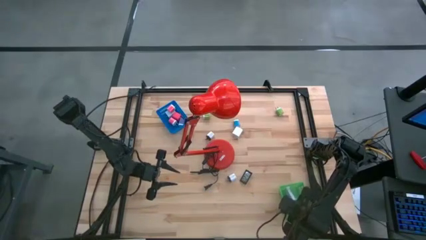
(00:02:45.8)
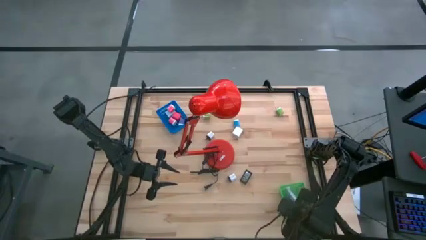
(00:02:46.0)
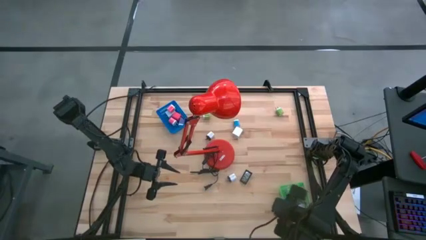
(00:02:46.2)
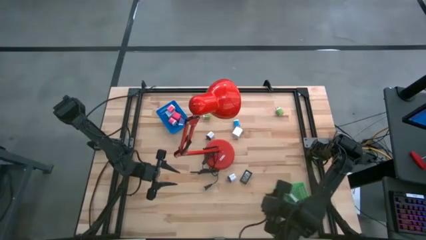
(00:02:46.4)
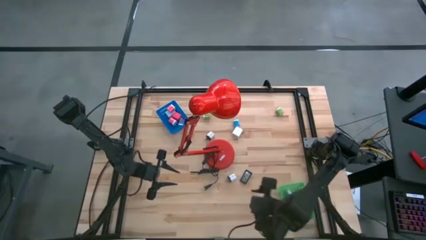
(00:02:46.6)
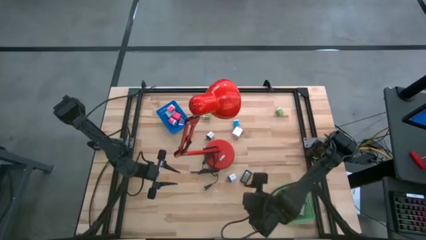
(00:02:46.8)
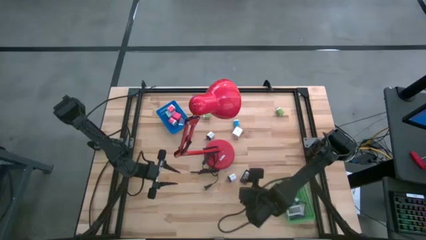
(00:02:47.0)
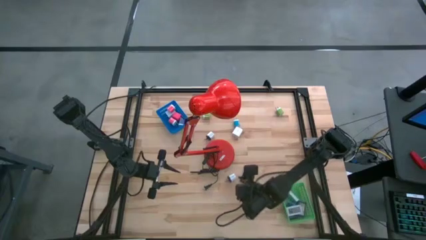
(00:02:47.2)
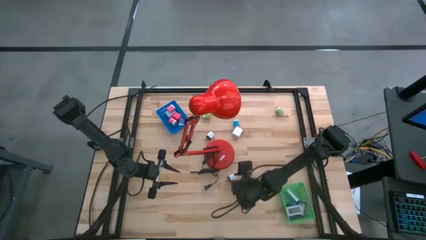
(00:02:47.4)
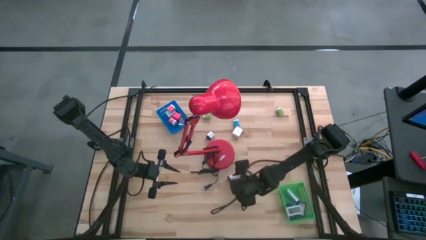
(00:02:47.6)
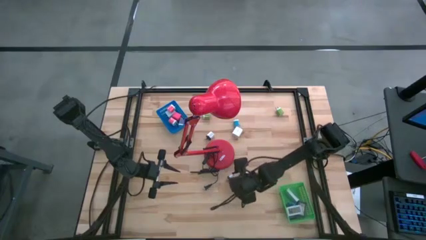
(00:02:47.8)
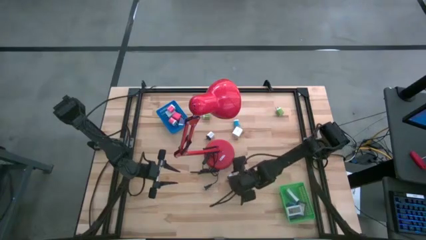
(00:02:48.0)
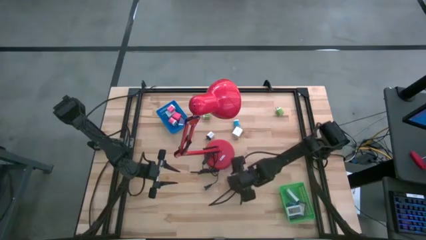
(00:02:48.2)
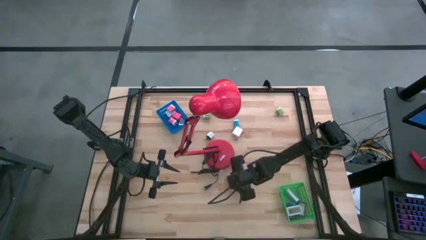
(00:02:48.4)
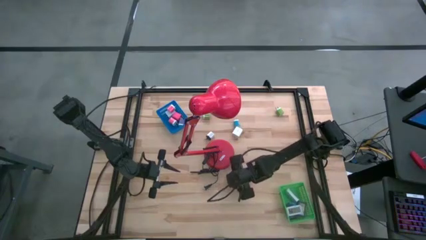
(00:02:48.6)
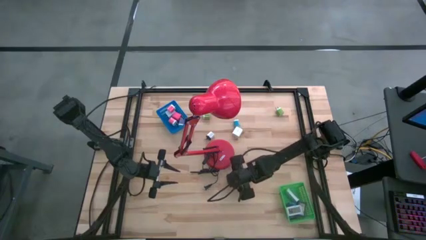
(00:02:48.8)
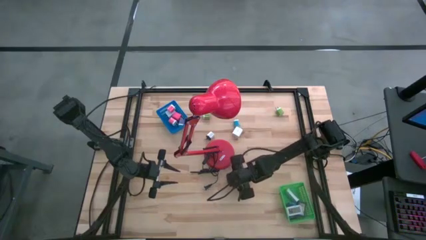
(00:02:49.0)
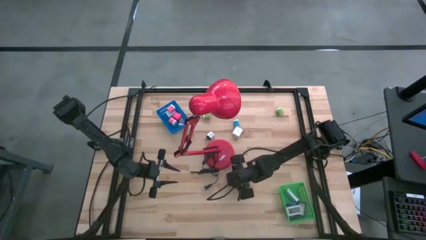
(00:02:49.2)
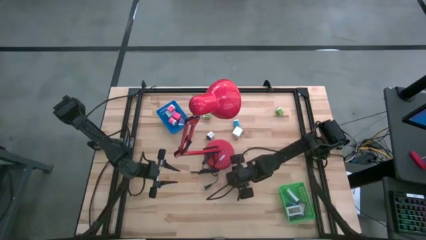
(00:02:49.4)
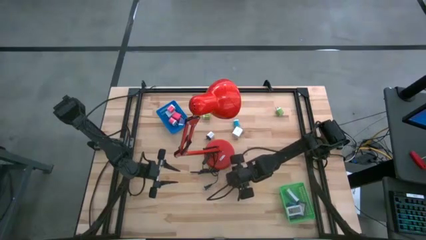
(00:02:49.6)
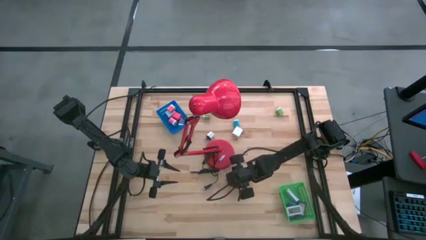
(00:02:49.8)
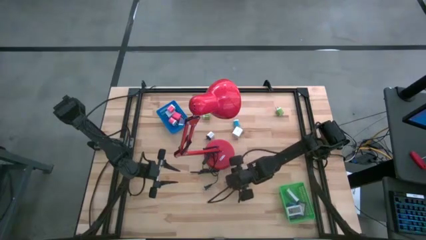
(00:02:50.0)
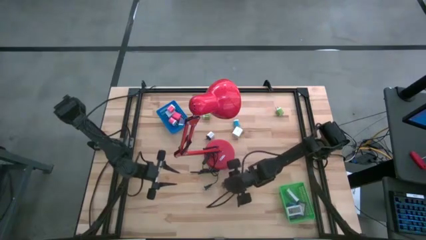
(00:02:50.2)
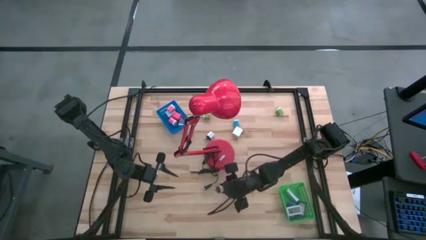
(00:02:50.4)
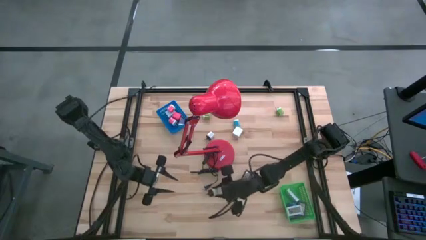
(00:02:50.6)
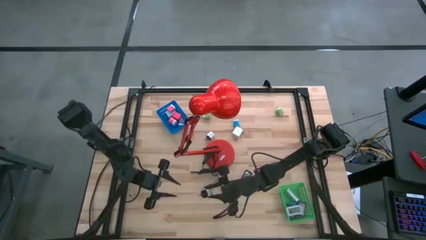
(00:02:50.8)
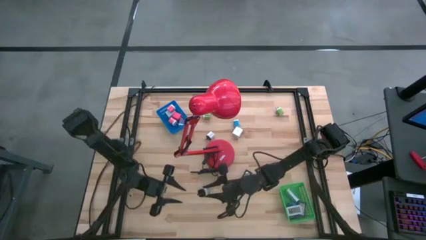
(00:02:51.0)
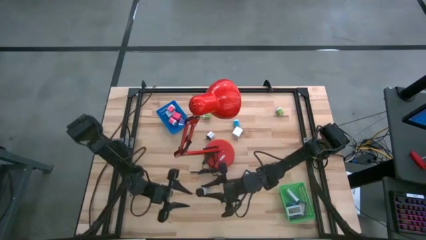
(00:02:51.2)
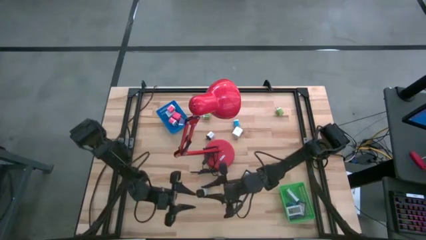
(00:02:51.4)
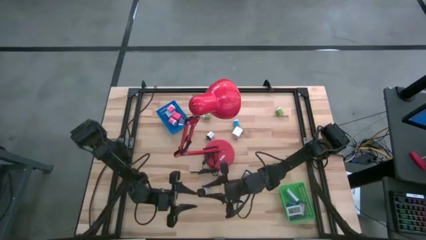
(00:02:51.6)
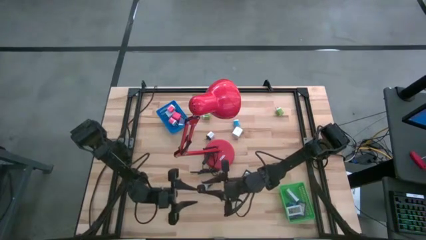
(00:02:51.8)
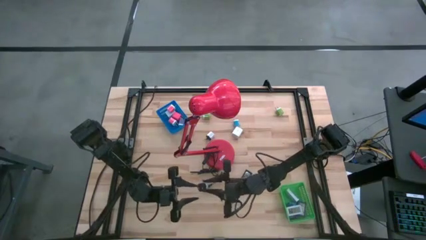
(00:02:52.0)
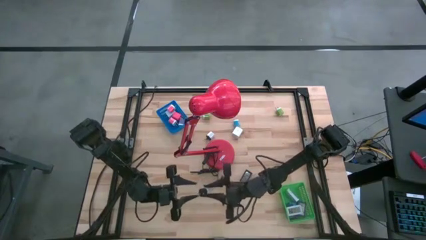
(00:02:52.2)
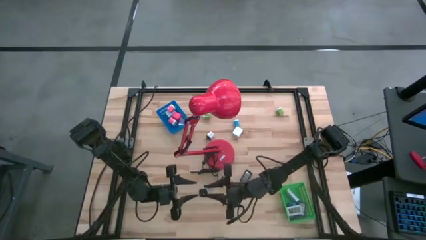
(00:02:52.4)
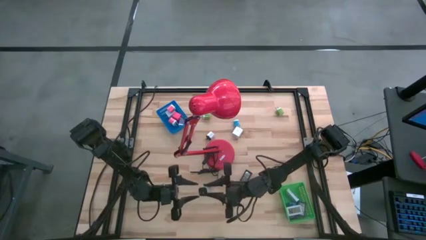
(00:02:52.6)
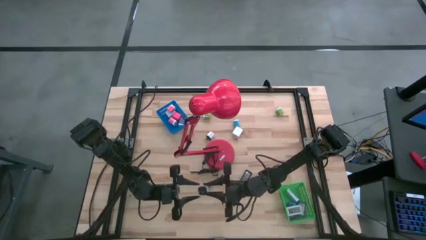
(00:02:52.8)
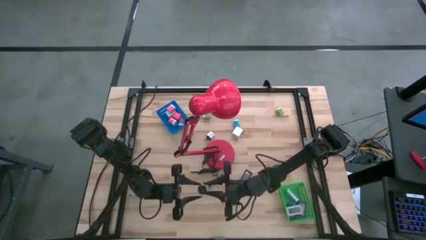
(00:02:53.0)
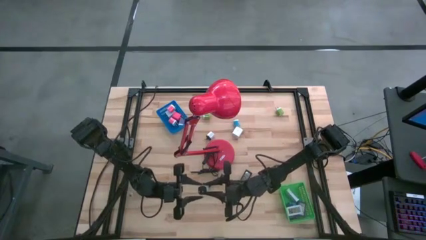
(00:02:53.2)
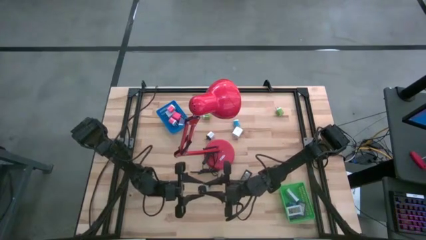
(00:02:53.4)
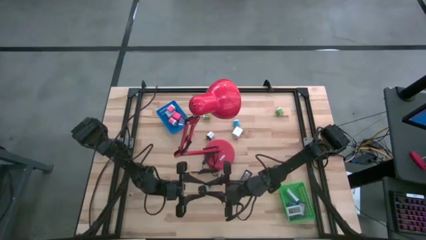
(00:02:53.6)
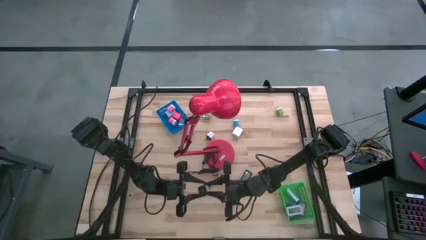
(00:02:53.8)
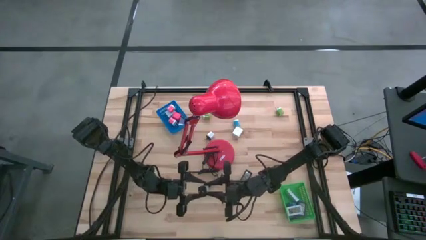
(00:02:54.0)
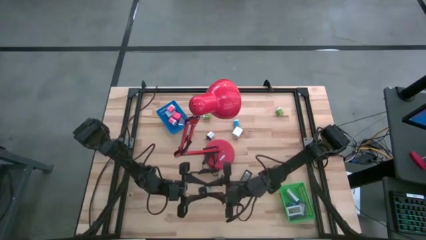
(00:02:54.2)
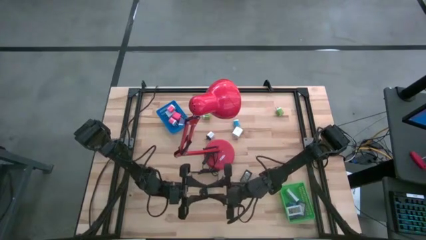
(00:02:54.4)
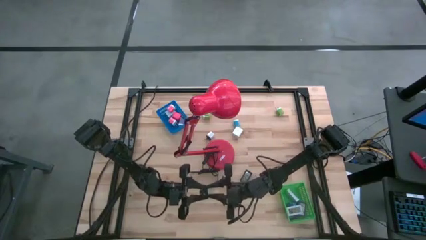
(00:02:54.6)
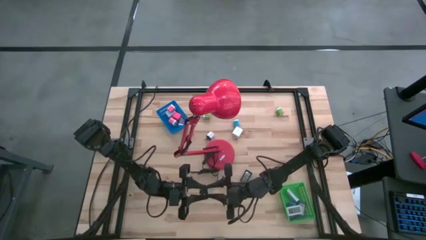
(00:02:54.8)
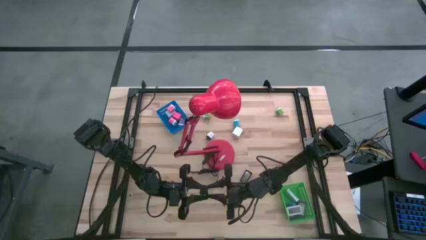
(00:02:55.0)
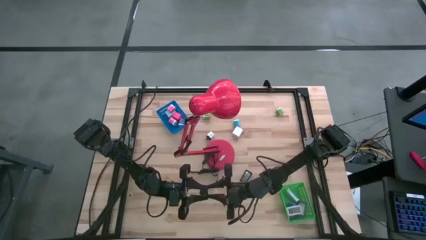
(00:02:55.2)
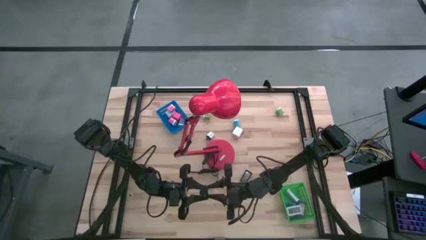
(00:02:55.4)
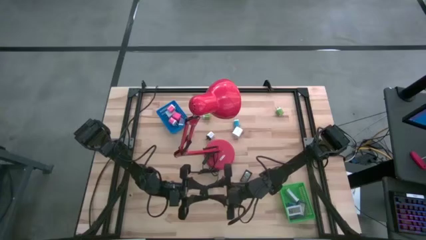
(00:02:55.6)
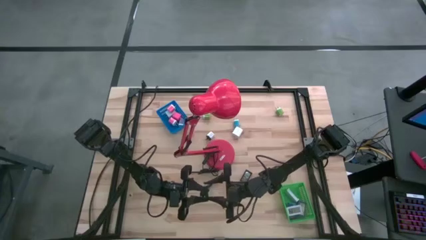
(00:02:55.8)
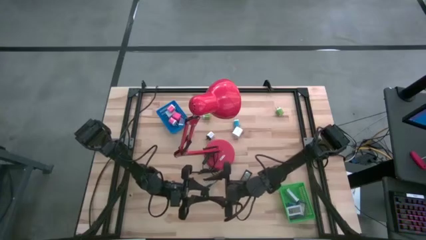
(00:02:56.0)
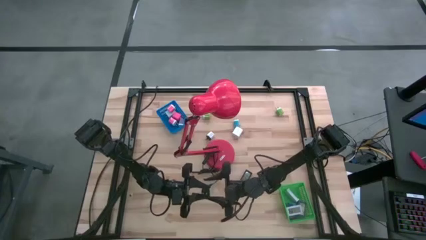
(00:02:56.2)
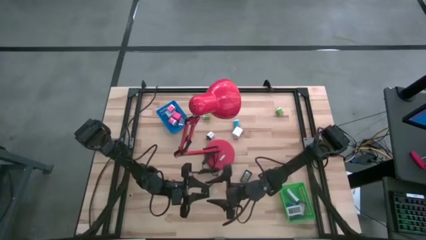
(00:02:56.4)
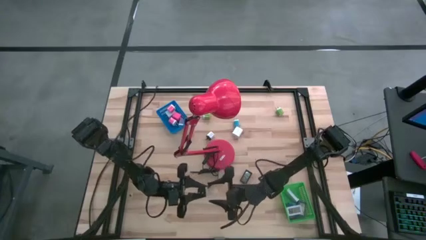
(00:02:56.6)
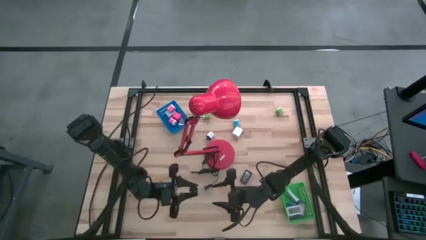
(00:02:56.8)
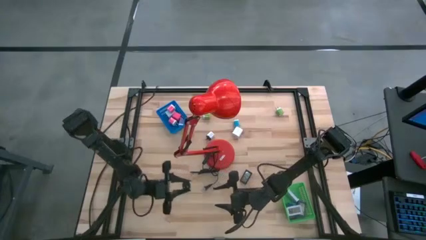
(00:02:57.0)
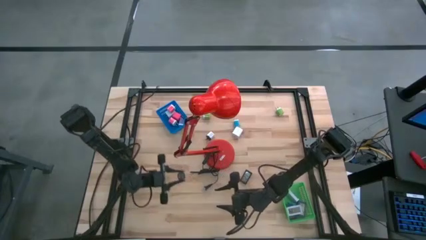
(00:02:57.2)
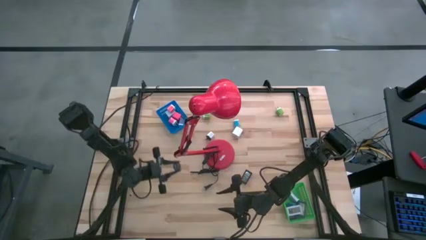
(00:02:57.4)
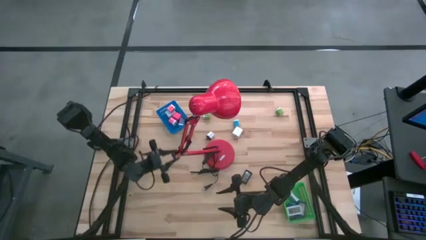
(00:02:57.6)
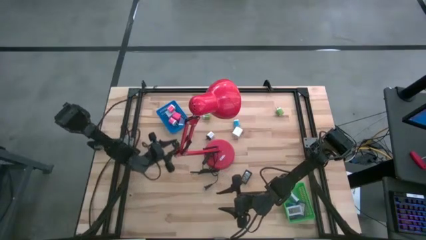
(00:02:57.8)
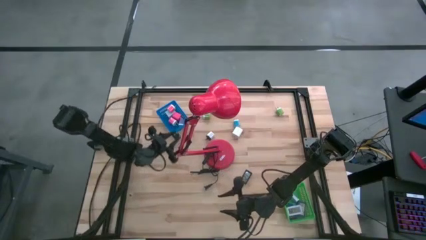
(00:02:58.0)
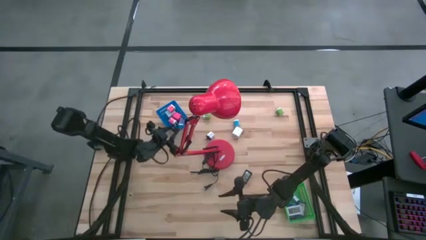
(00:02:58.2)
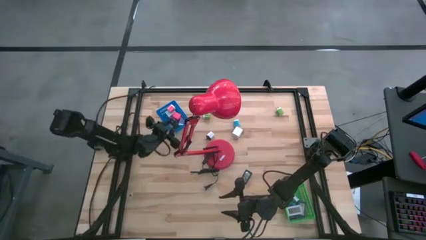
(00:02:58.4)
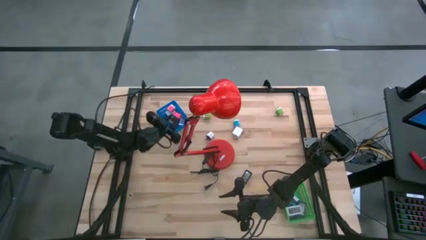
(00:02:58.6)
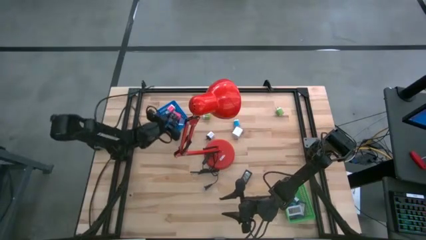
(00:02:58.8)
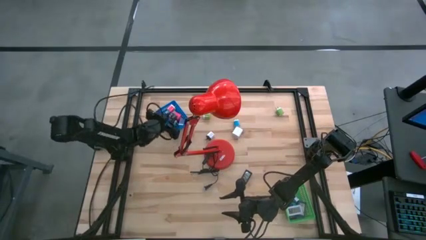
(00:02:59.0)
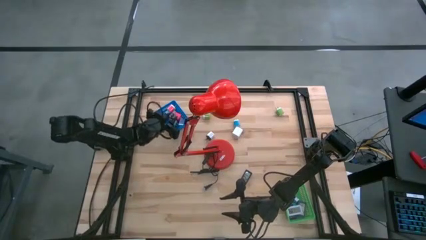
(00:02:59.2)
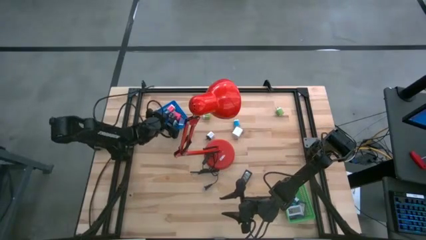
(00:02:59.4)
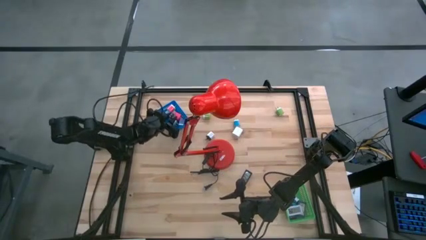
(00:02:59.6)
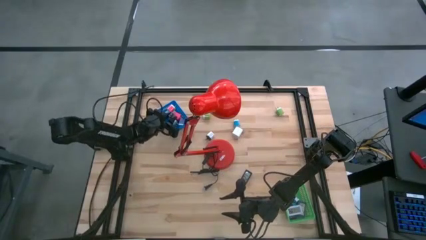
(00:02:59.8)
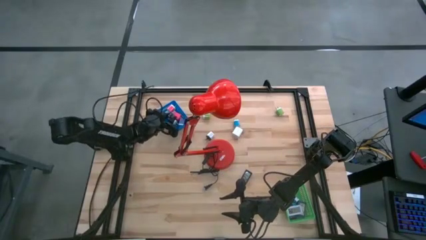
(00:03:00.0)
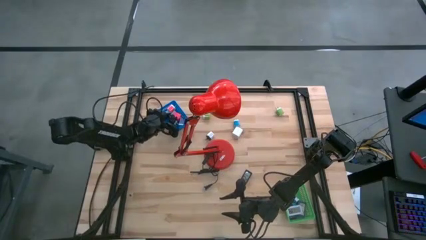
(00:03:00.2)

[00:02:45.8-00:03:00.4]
Task: Pick & Place Office items
Put the bottom white black charger adapter into the blue bin
